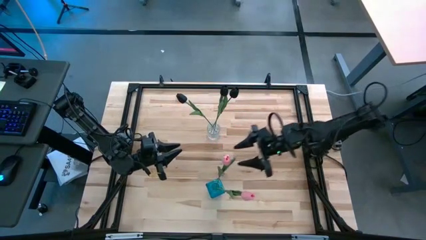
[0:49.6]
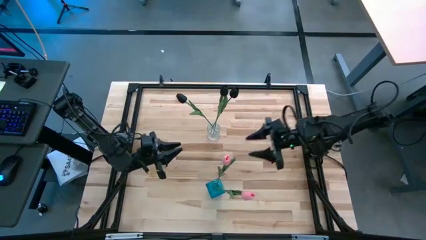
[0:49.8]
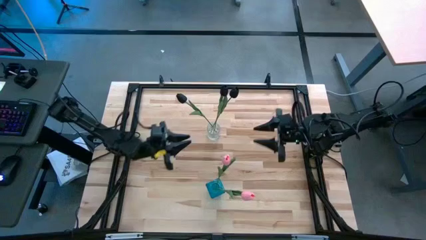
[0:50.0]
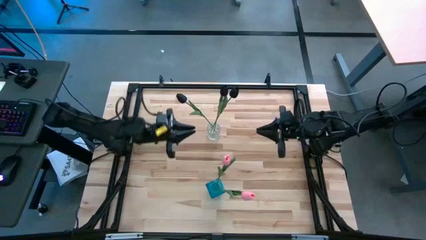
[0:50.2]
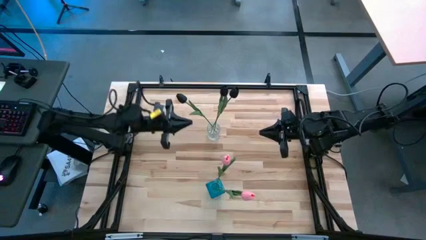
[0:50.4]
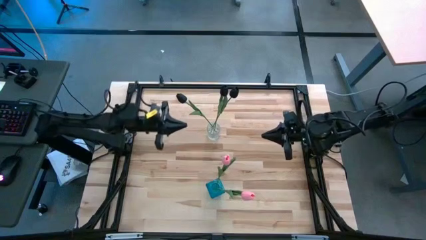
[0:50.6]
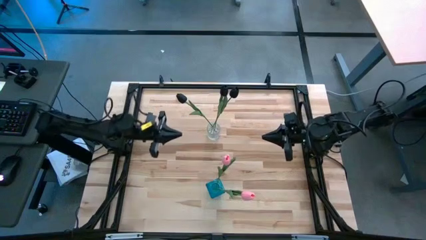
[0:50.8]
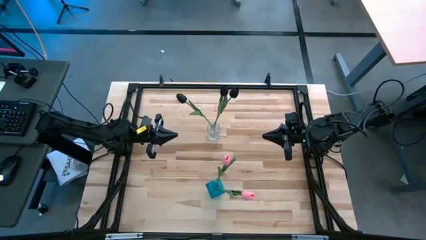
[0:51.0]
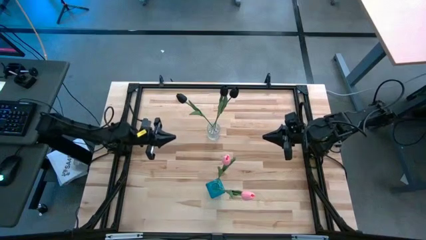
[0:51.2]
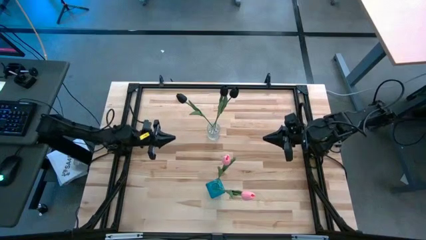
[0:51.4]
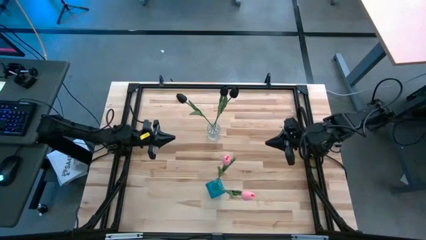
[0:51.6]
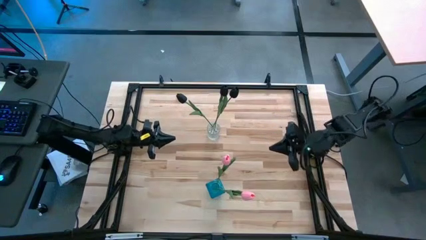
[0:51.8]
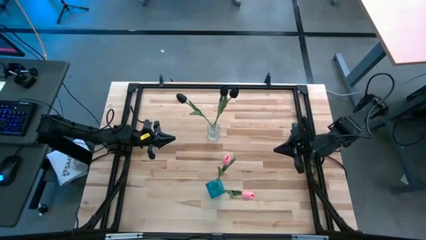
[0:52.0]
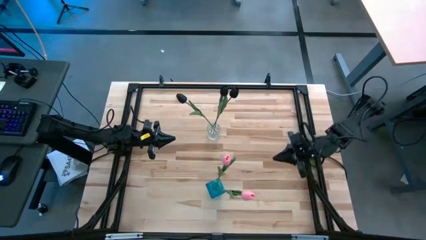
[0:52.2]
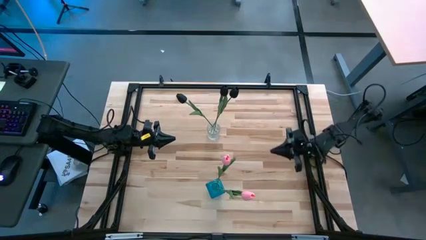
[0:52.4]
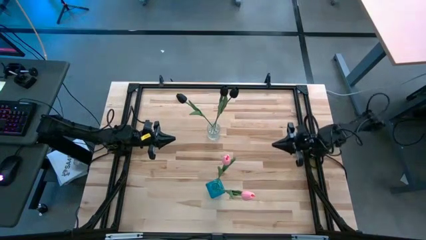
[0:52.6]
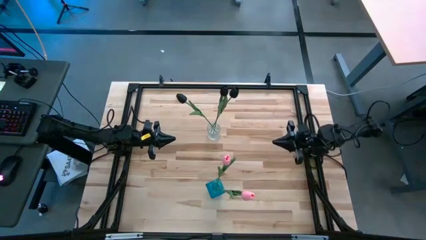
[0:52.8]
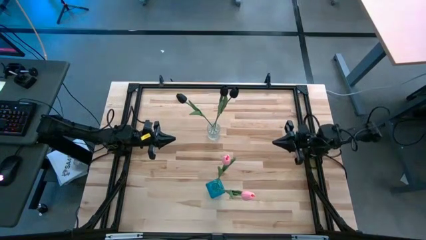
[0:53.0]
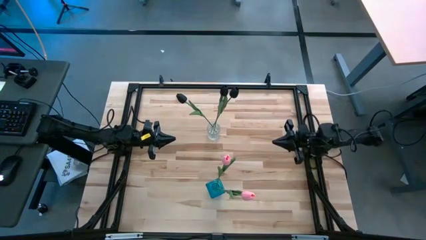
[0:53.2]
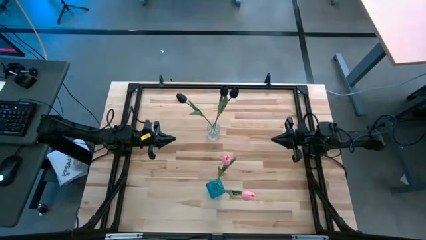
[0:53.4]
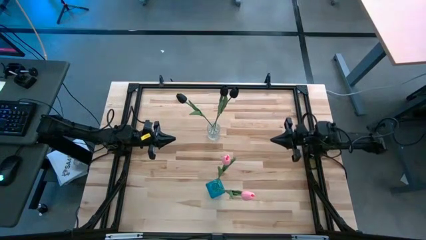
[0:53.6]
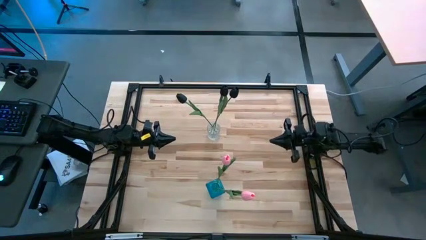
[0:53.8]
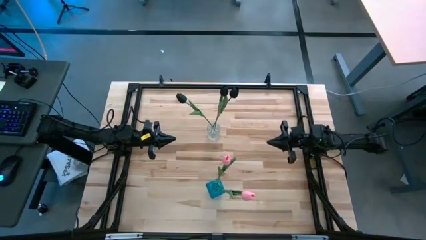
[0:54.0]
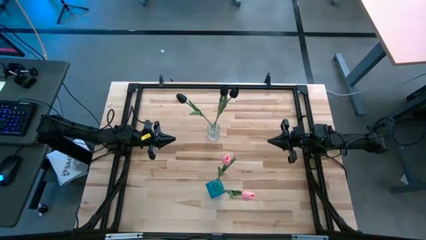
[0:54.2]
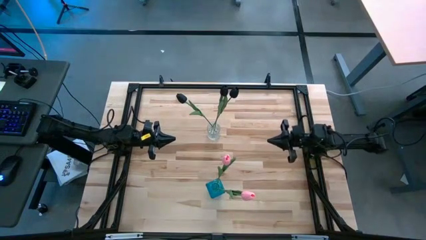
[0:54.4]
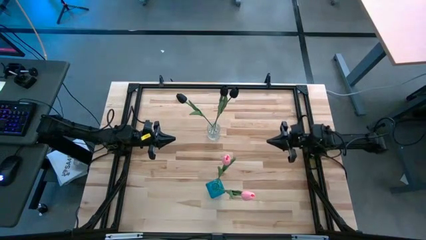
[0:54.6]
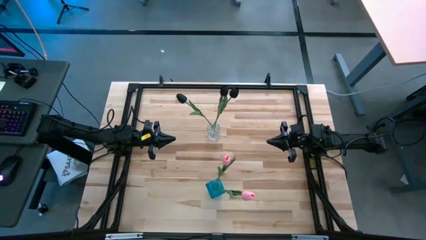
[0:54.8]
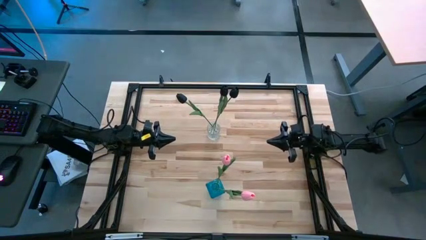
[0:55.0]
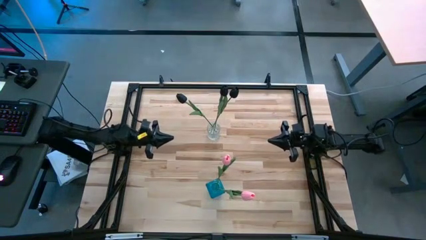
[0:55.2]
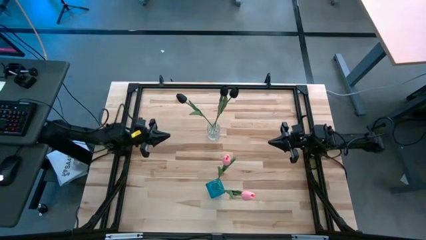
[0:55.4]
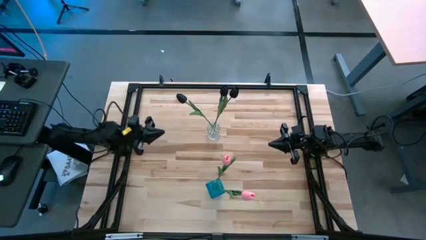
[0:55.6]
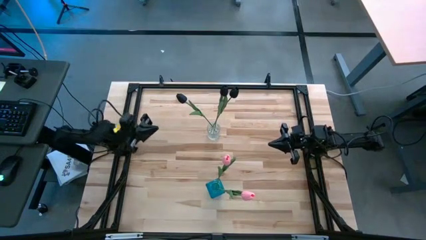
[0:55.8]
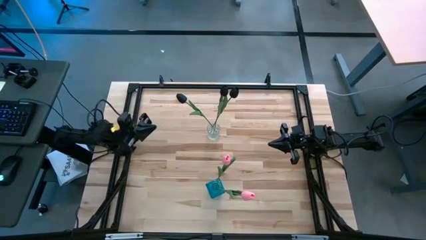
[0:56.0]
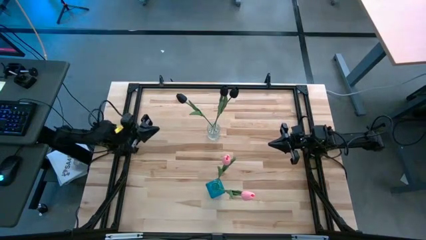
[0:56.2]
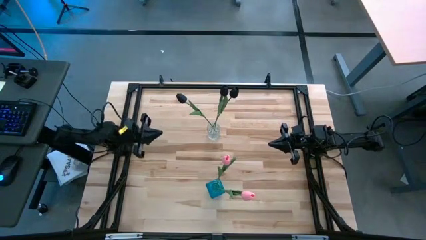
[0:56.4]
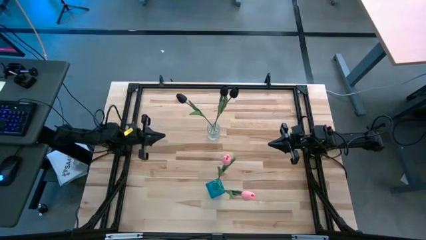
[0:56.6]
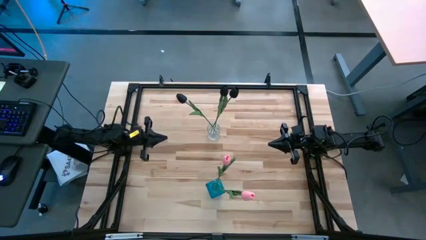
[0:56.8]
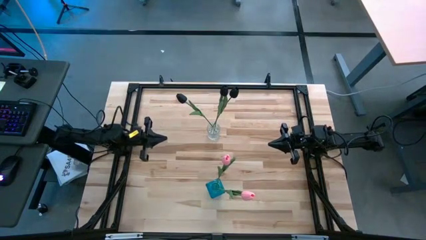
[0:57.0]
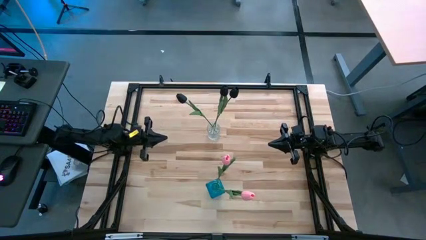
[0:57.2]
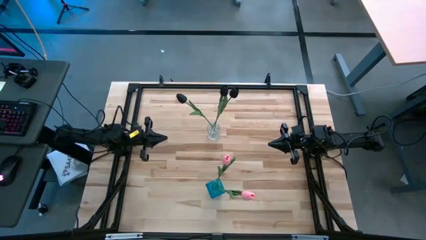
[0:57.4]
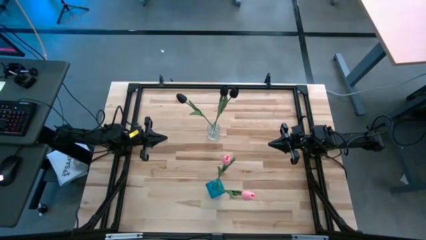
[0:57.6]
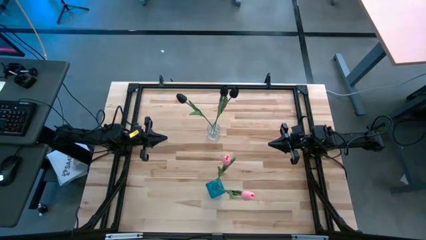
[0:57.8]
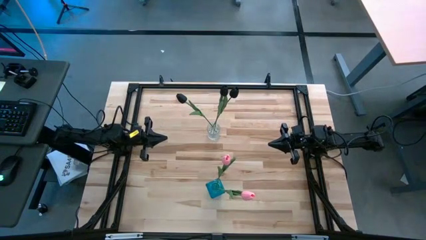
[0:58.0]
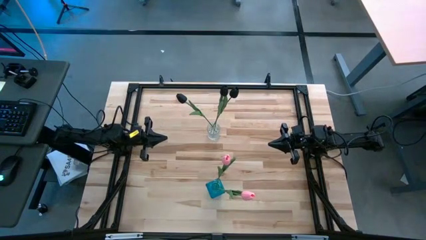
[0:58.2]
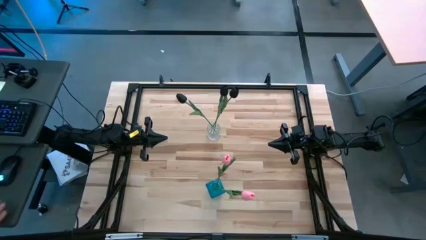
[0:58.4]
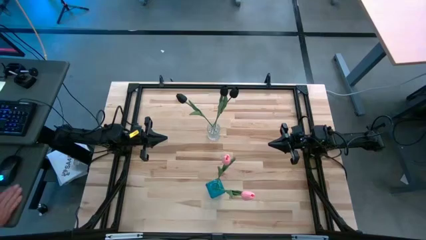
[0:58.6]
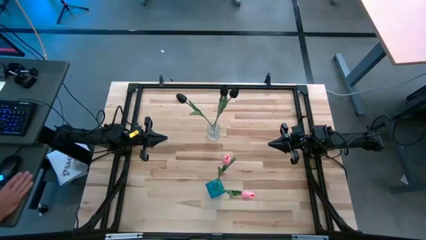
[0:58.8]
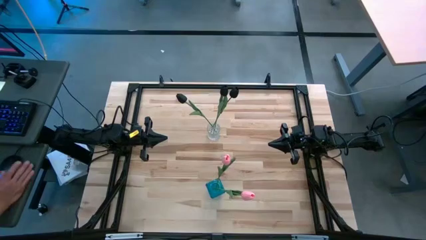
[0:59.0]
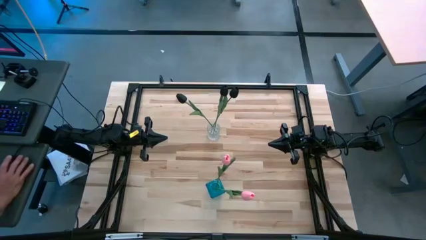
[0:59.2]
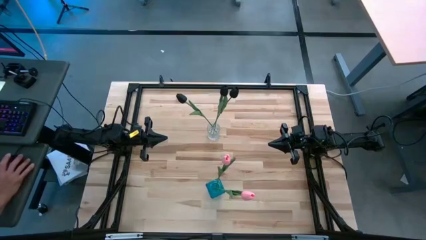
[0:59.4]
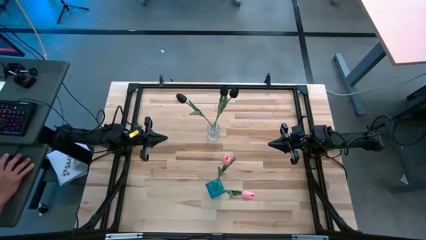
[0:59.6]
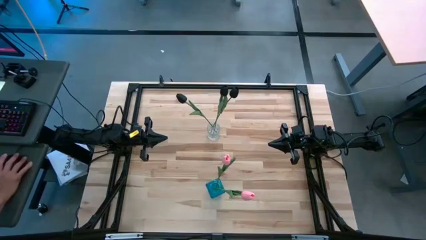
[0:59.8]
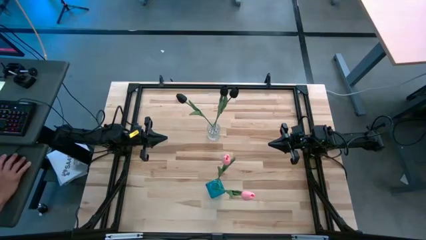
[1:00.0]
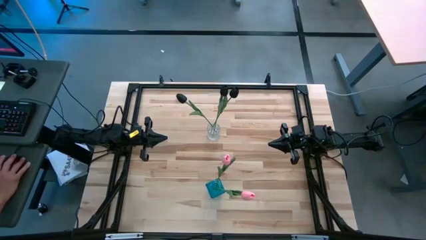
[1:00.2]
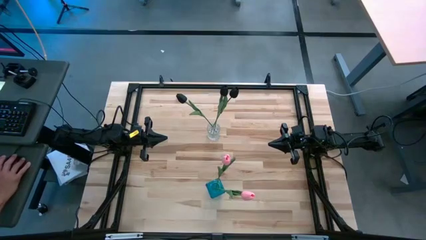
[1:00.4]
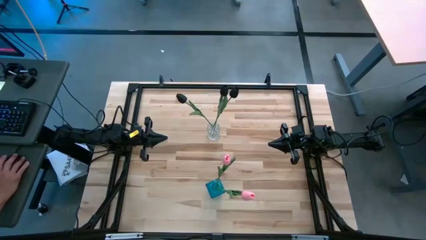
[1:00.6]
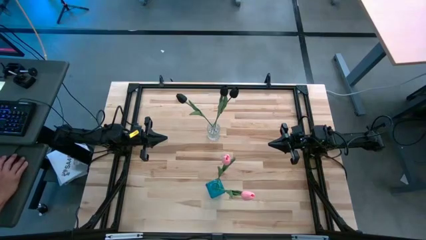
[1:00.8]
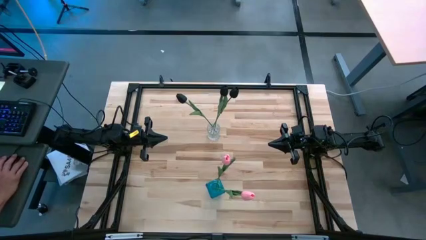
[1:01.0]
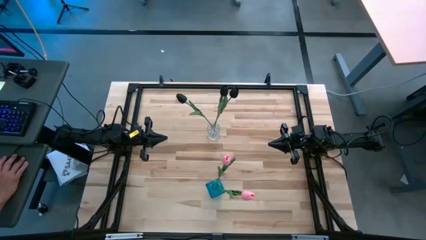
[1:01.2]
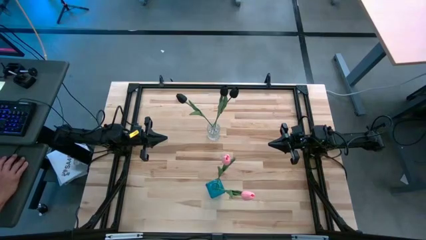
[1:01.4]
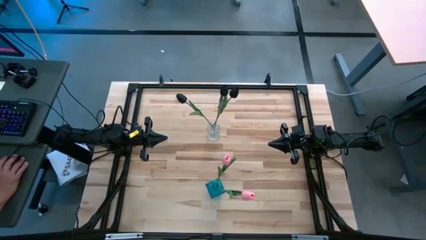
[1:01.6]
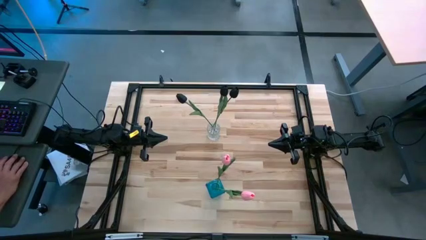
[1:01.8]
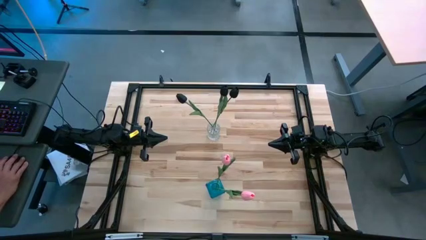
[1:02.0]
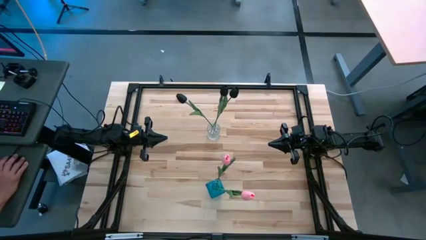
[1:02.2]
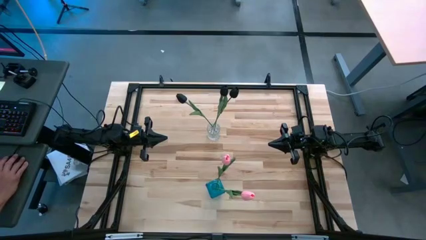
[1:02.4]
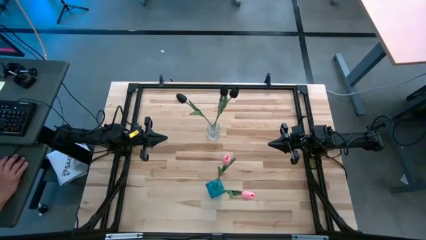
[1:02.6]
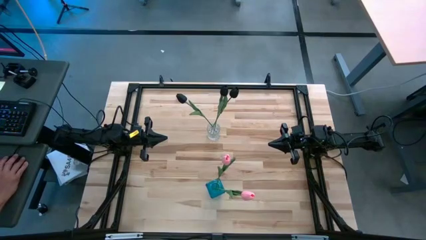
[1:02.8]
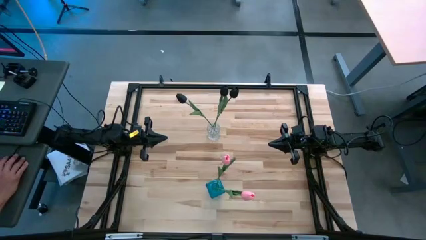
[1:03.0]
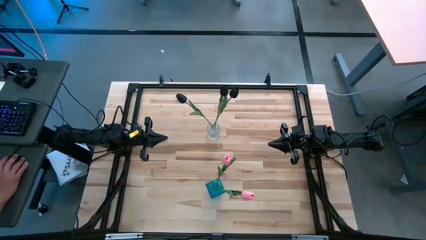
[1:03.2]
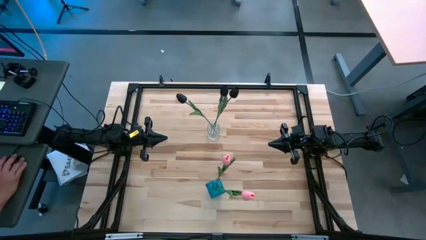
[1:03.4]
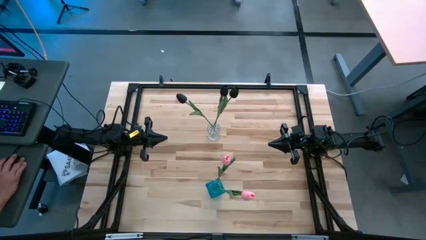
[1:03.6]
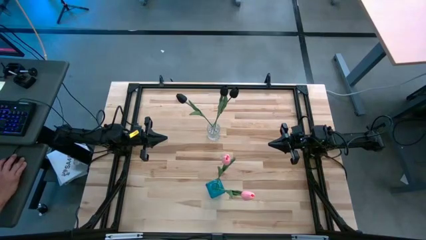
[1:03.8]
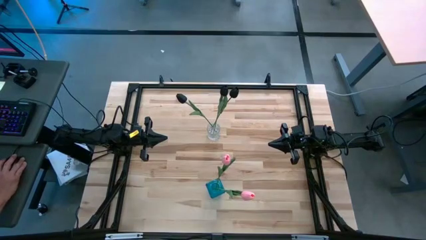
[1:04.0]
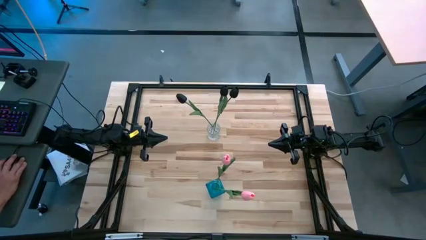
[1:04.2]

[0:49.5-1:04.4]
Task: Sort flowers into vase by color
Return to Home Position

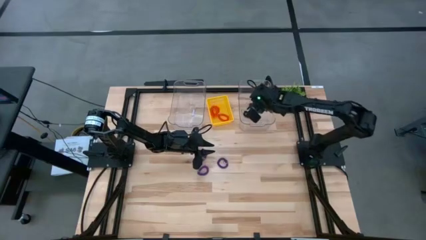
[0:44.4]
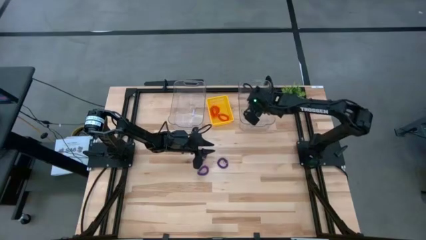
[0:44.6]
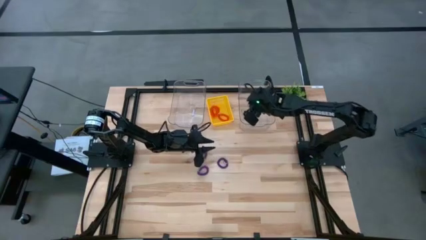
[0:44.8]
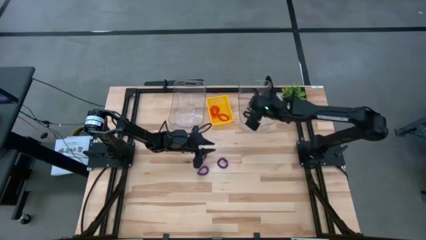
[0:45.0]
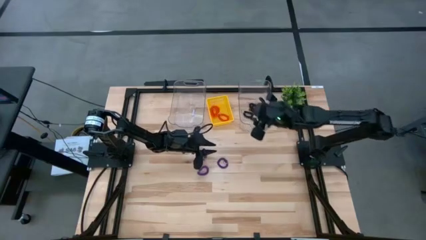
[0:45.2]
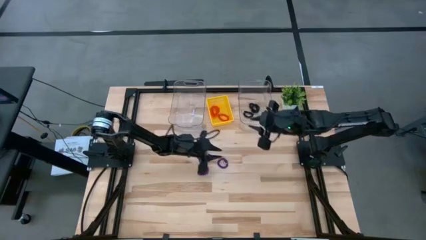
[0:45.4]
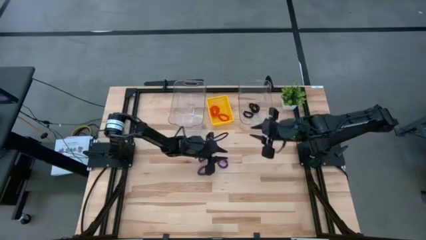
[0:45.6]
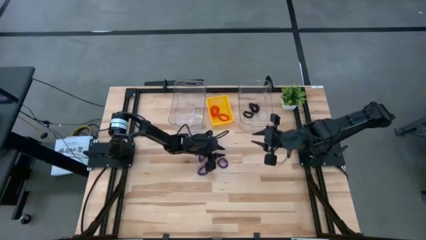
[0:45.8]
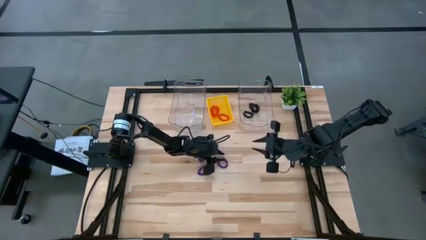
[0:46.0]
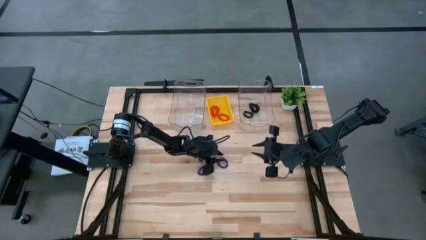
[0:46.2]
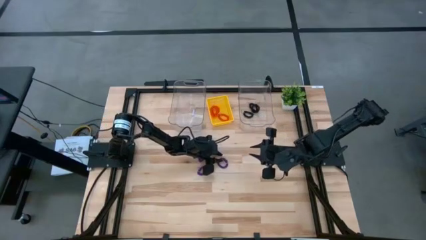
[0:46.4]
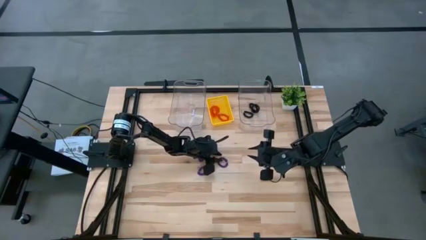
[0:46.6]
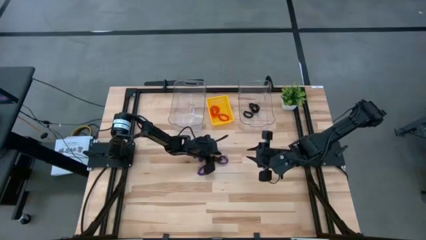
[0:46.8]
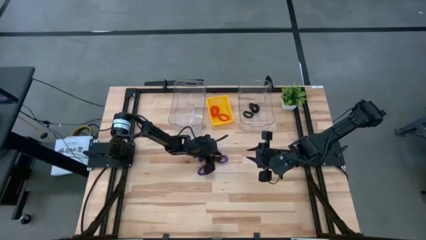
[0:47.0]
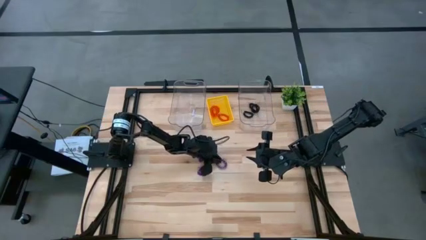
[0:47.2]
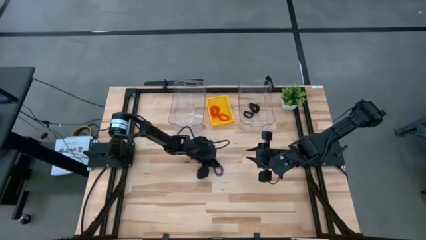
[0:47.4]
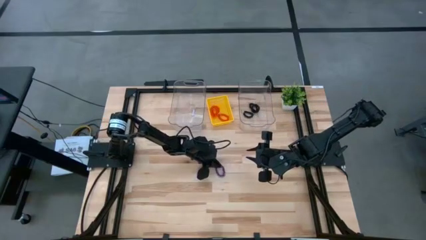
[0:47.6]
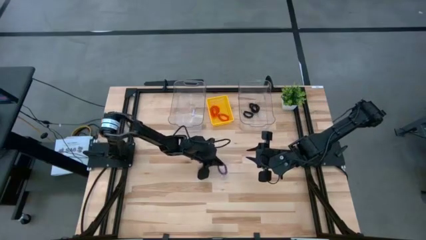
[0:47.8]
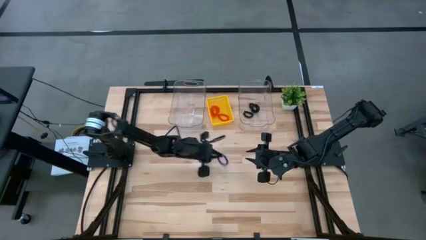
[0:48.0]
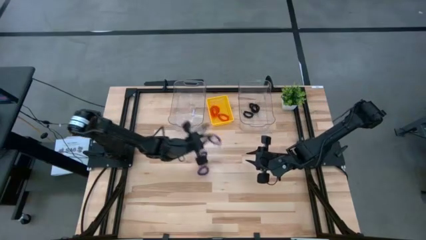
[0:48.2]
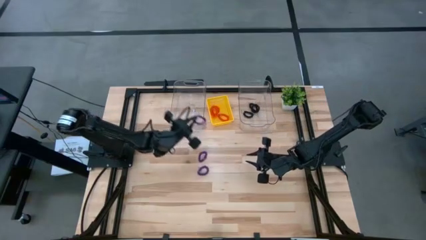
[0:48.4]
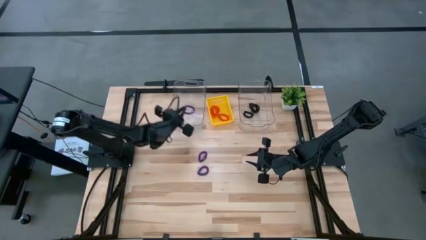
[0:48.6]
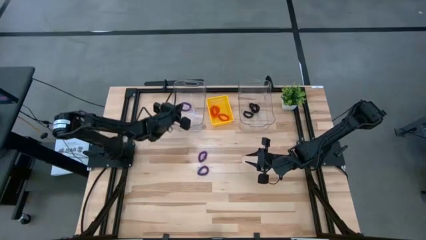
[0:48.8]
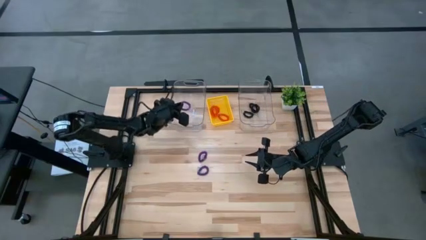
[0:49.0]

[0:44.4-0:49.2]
Task: Sort spring keychains
Put the right purple spring keychain into the left transparent bin
